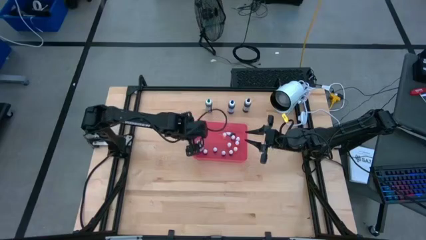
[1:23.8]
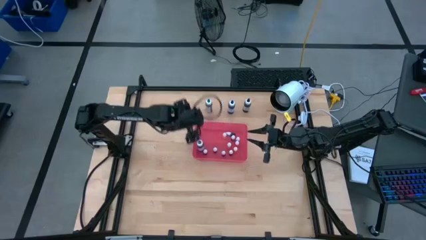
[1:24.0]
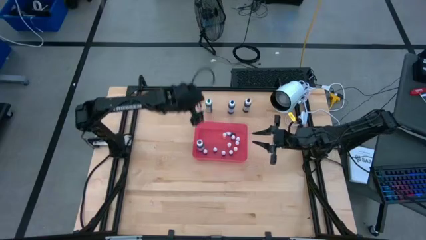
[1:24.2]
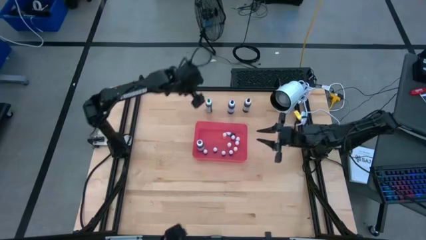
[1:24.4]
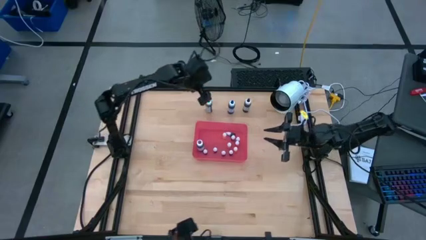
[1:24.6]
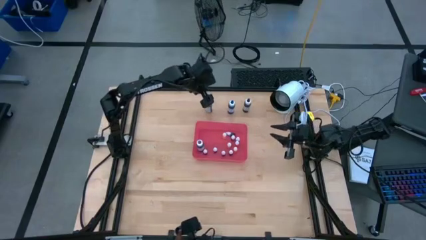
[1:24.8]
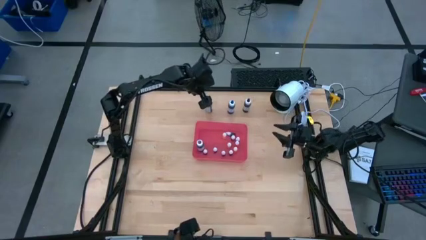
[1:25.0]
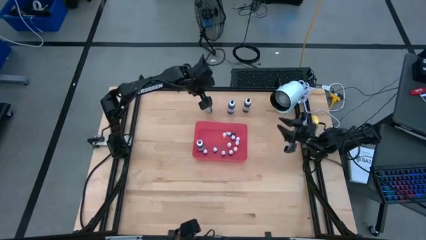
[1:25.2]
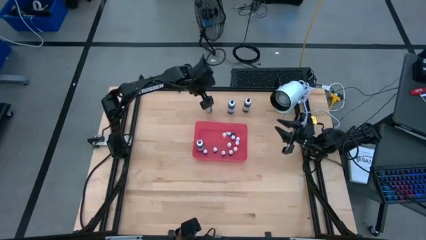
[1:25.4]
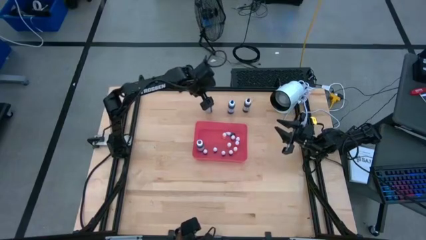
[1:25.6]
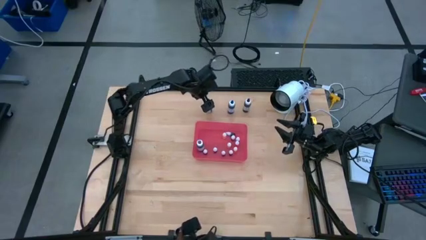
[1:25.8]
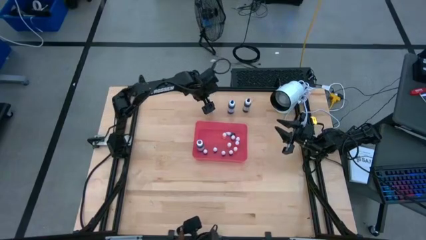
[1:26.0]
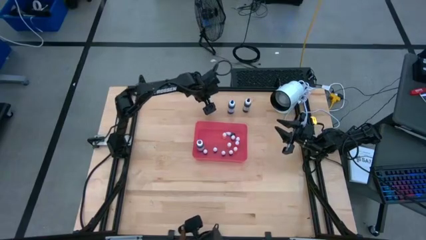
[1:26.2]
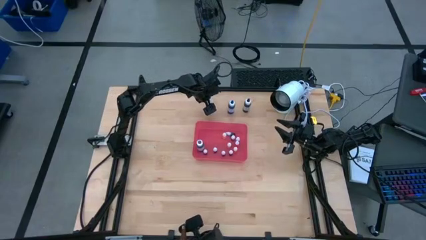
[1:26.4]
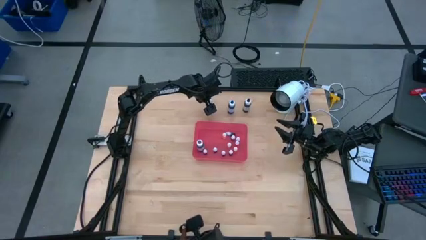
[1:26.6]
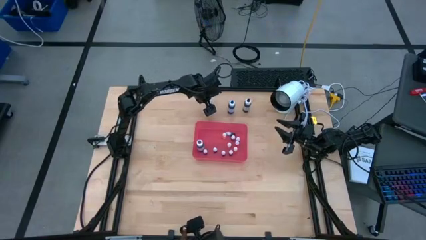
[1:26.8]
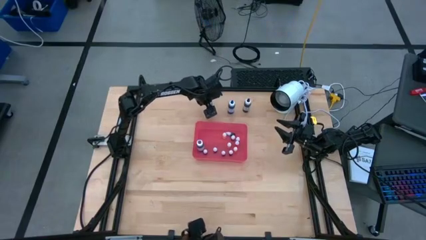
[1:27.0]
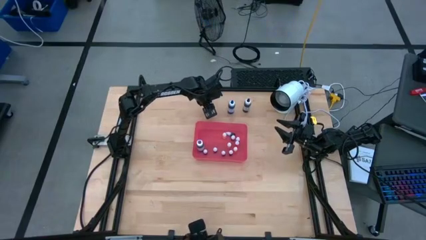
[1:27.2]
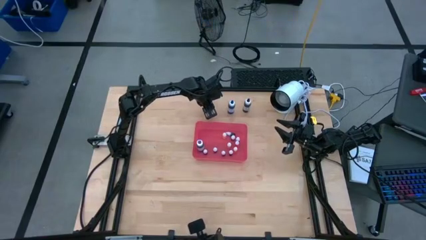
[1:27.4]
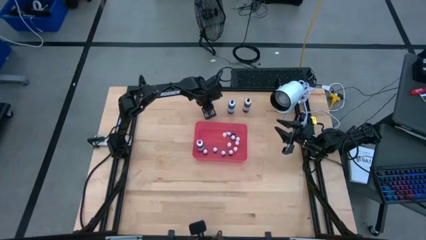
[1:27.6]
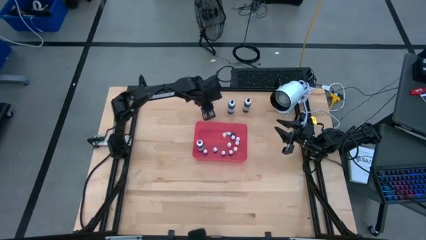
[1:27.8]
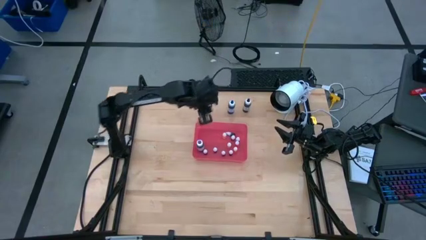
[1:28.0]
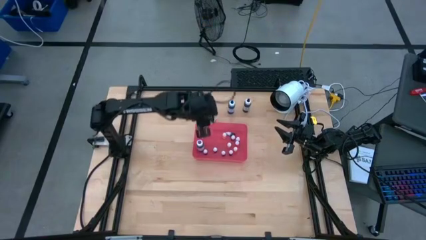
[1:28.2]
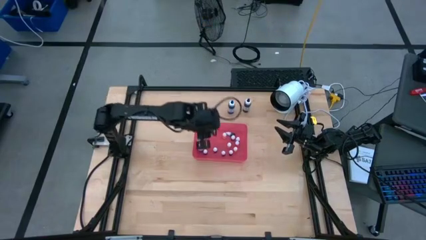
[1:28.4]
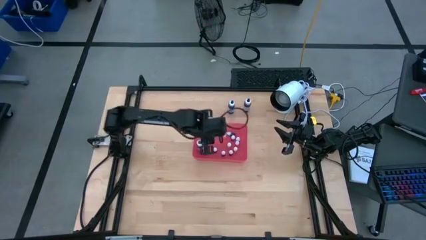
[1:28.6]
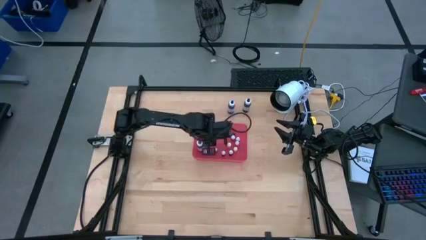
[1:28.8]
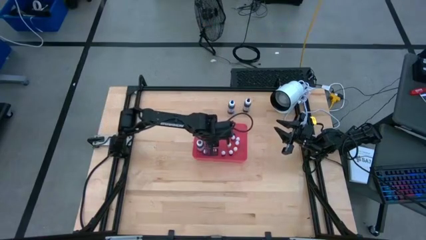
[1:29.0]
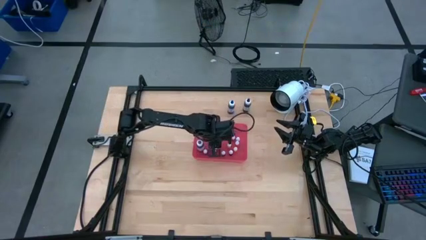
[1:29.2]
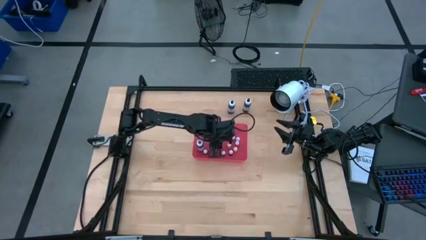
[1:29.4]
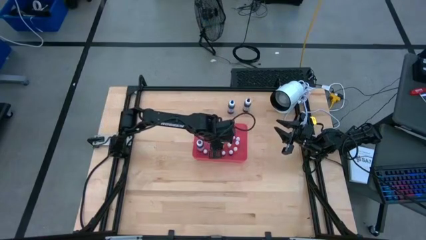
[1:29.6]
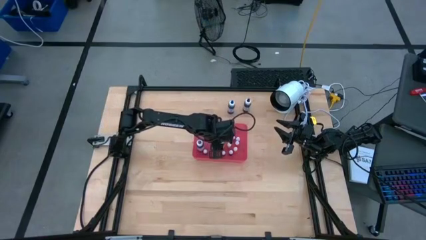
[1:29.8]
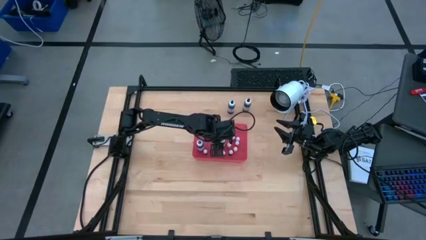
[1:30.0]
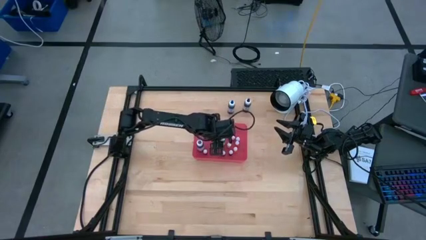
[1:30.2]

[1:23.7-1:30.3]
Task: Pick & Place food coloring
Put the large green food coloring bottle into the red bin

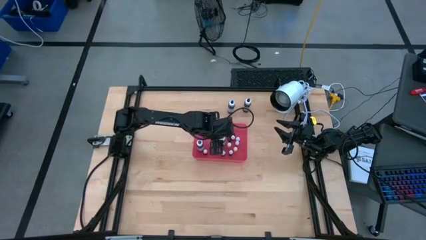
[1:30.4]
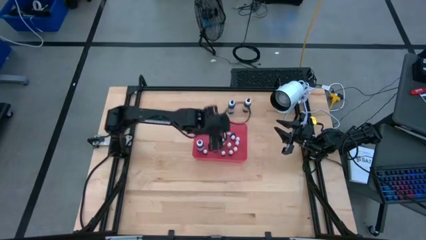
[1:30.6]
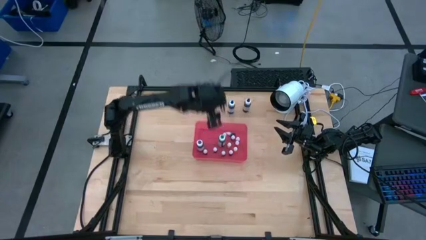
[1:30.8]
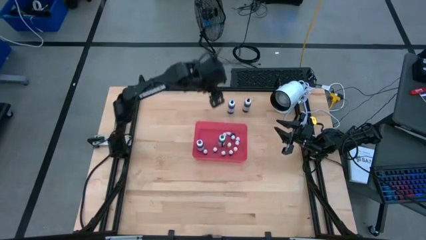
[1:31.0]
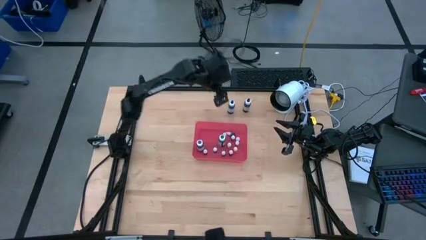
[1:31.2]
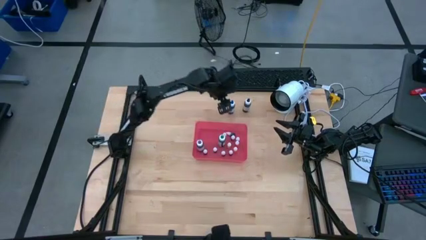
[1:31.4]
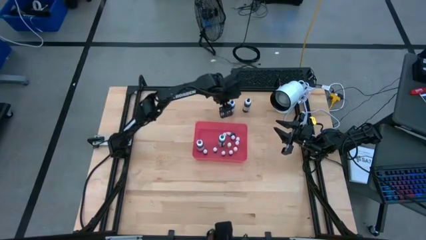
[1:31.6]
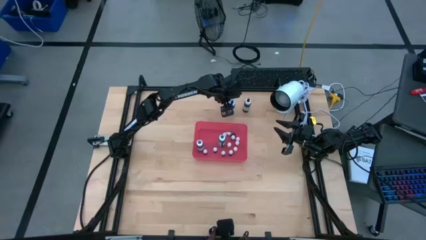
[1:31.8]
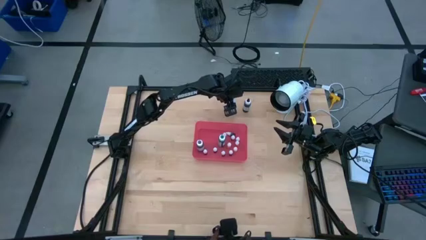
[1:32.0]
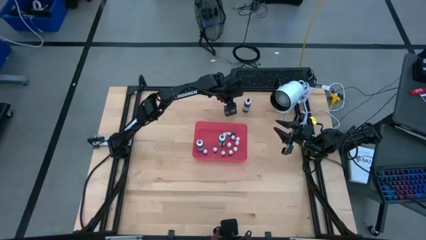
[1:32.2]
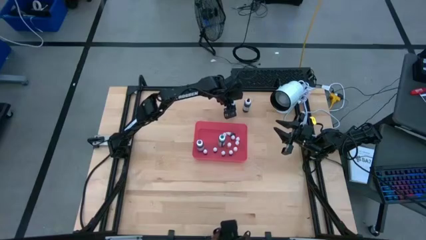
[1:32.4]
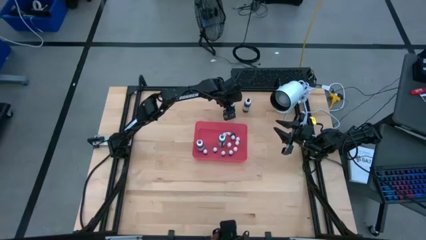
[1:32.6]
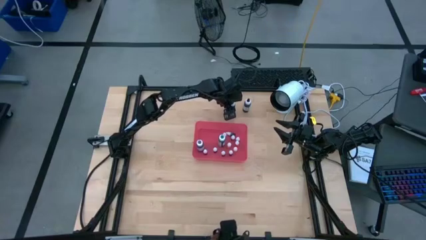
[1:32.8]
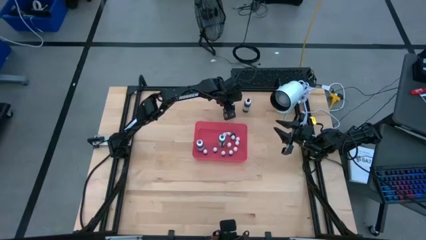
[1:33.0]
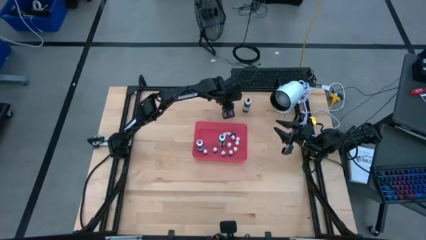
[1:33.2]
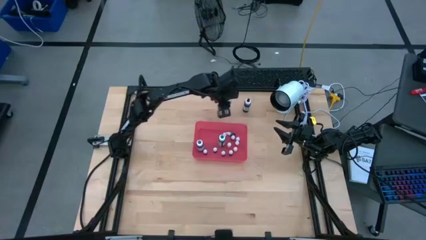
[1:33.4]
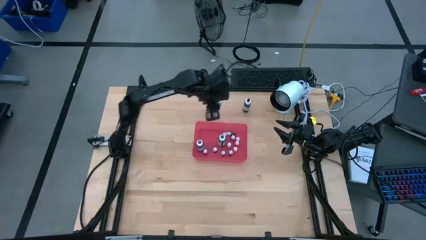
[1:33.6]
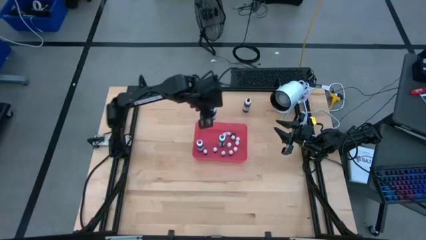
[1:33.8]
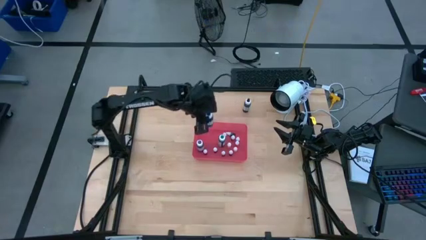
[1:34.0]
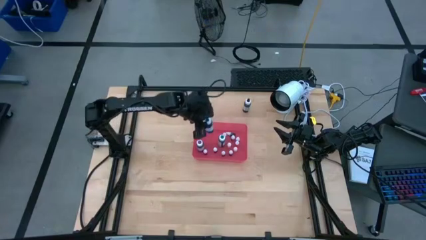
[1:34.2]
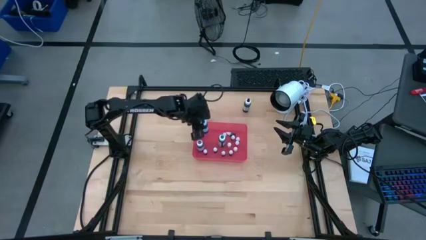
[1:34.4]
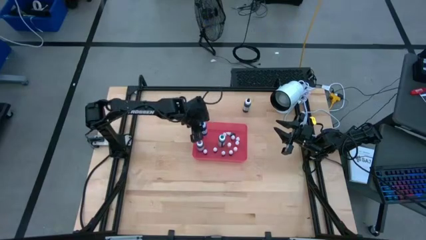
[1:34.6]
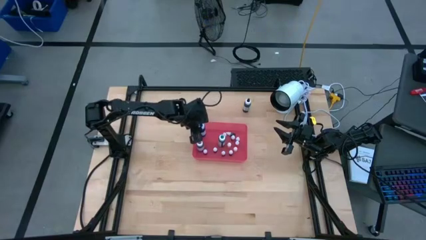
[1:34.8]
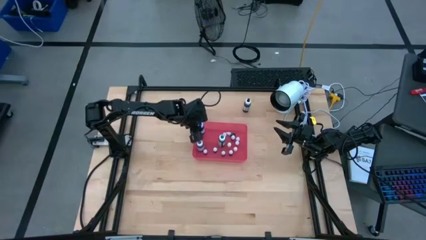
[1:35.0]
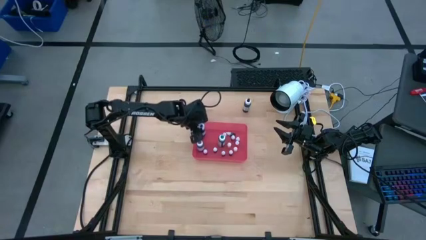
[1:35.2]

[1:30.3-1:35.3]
Put the large blue food coloring bottle into the red bin
